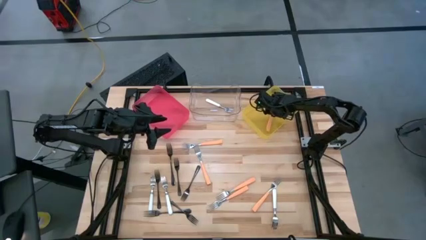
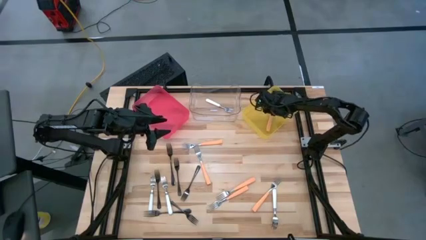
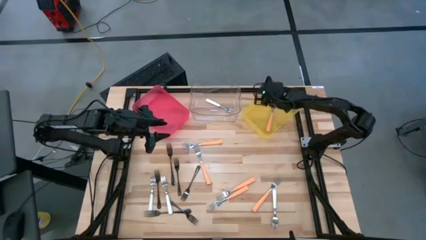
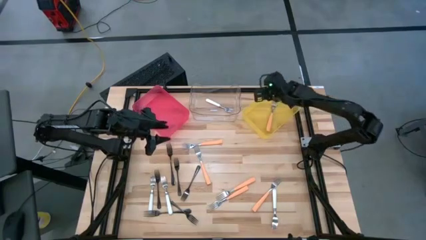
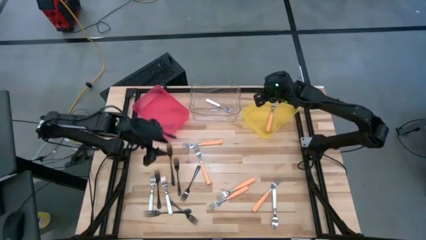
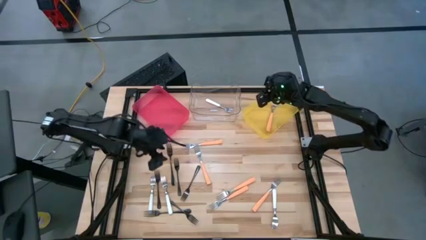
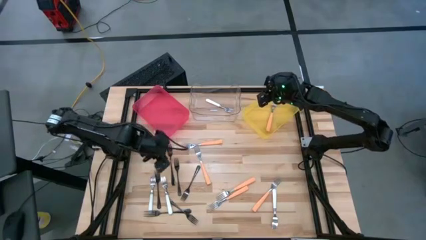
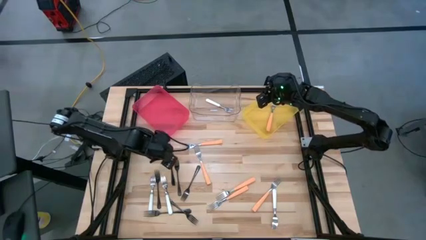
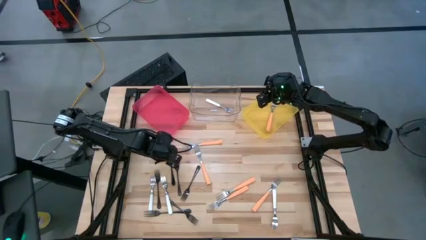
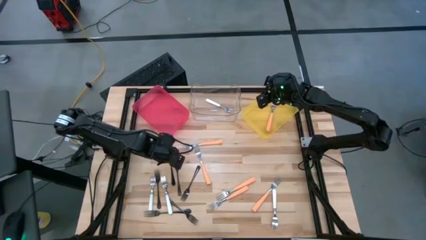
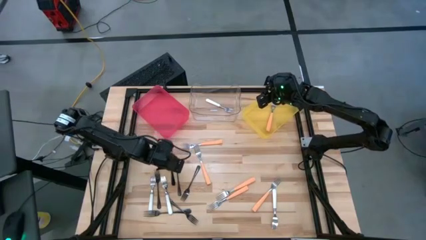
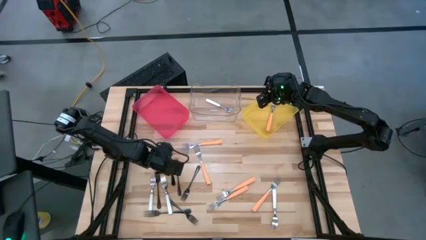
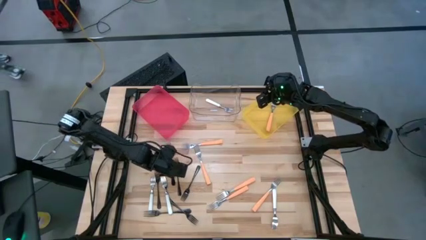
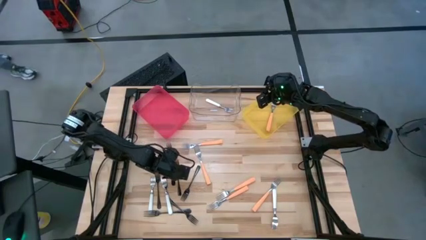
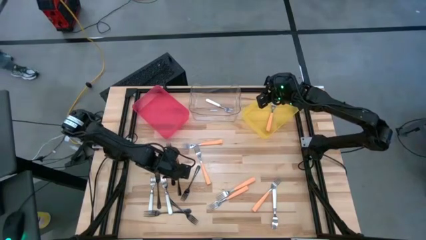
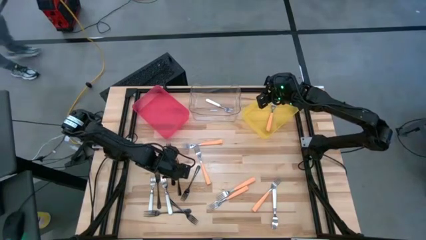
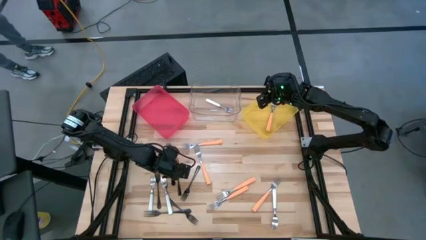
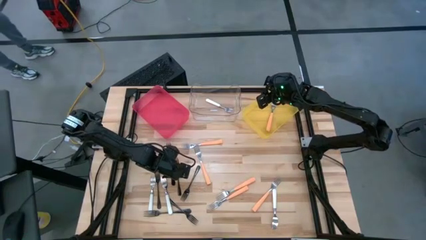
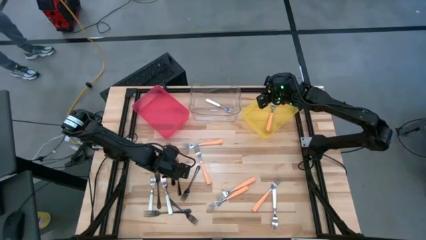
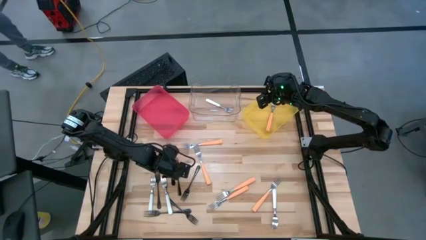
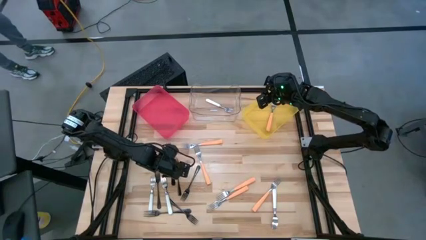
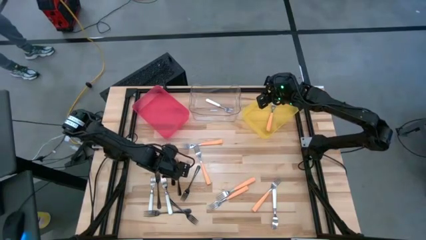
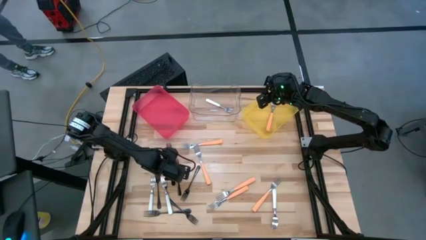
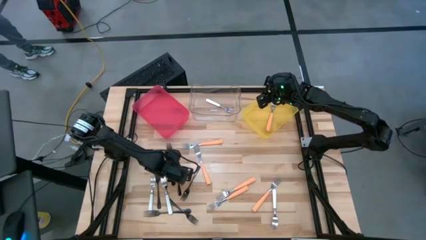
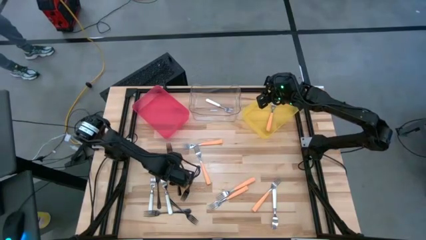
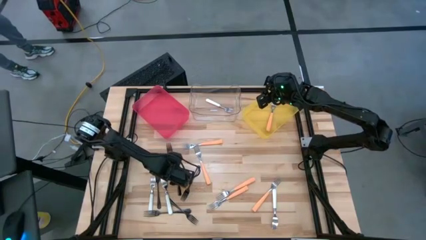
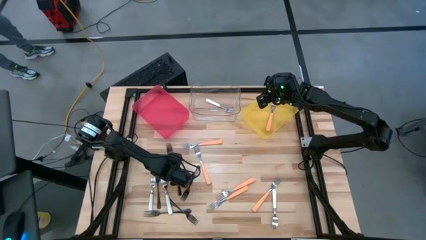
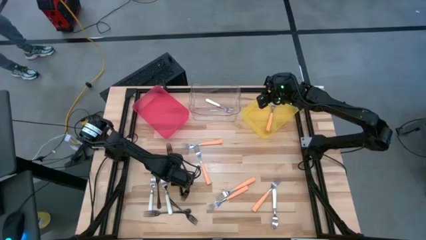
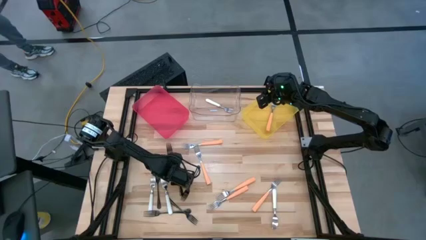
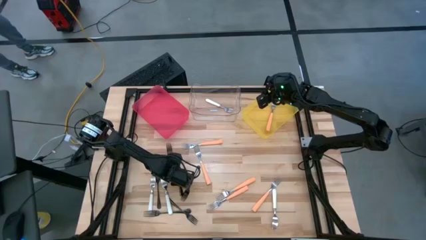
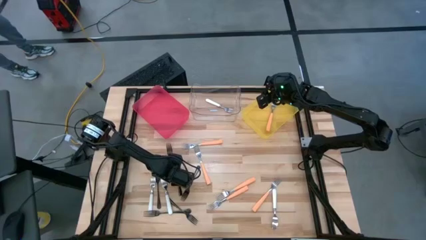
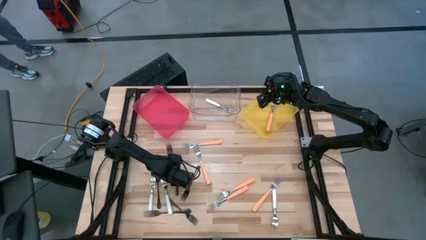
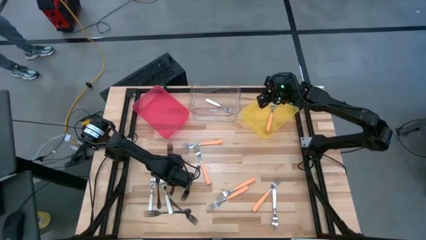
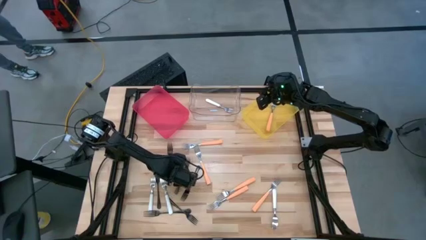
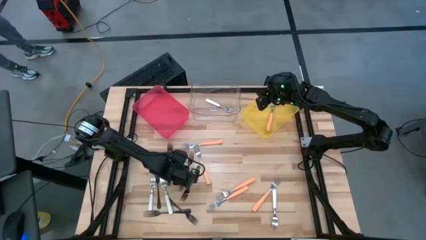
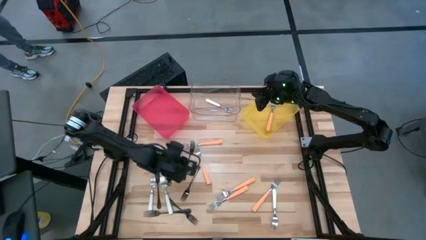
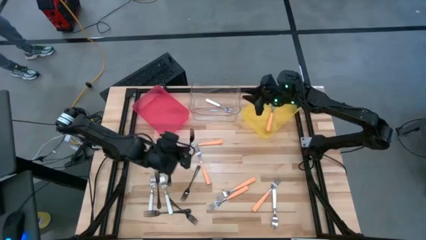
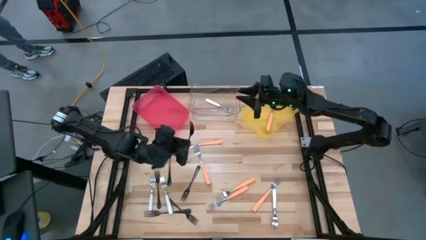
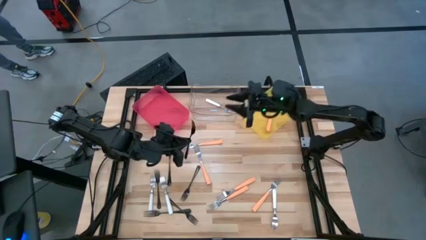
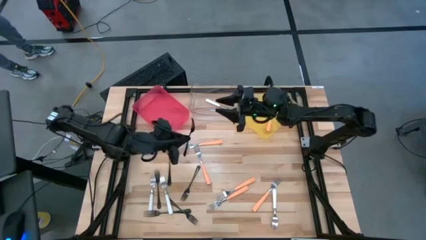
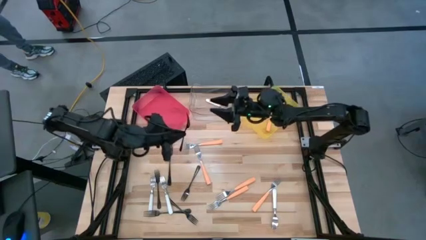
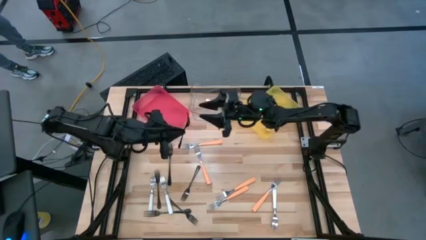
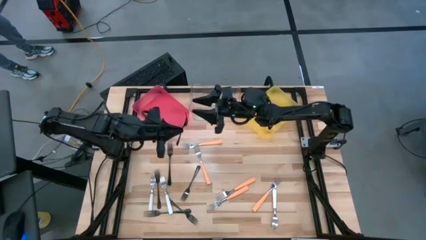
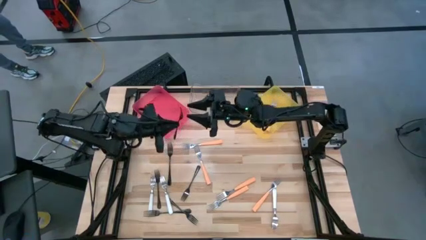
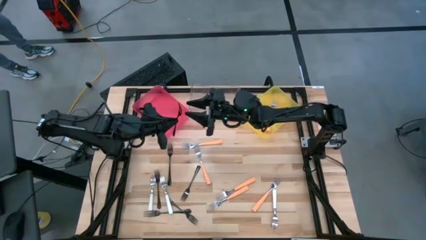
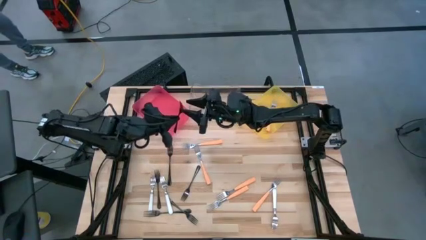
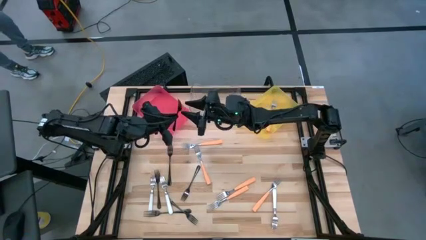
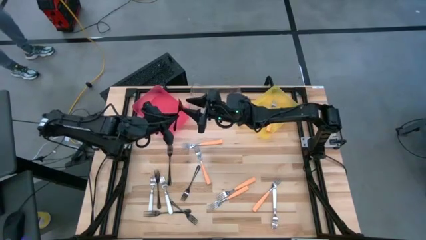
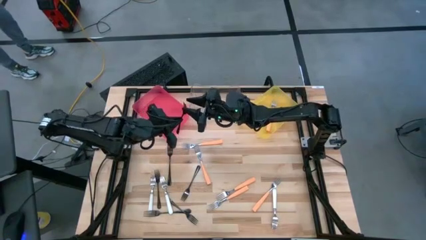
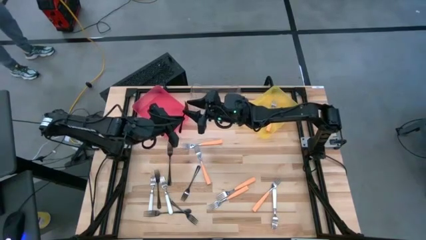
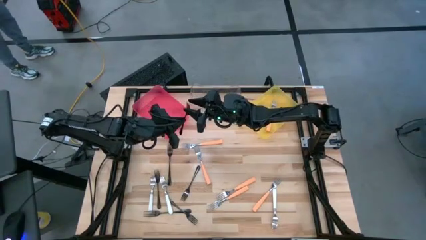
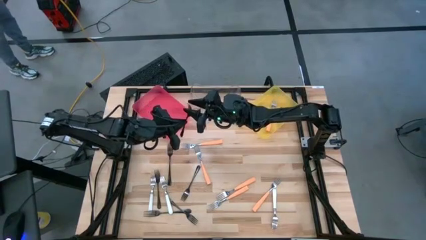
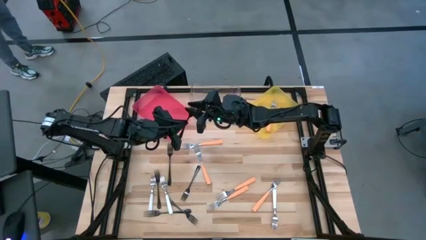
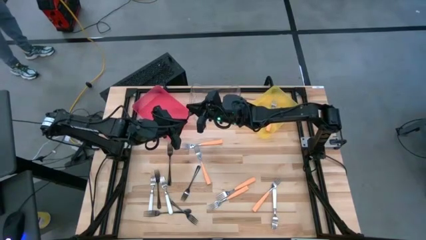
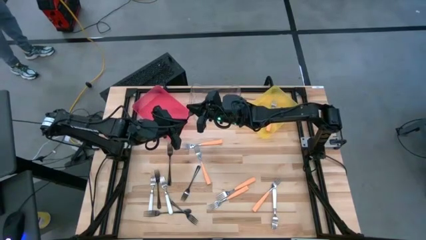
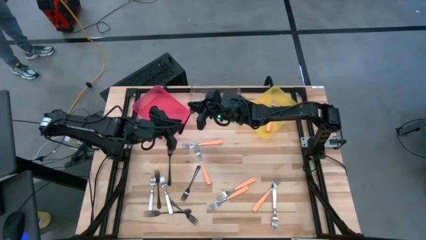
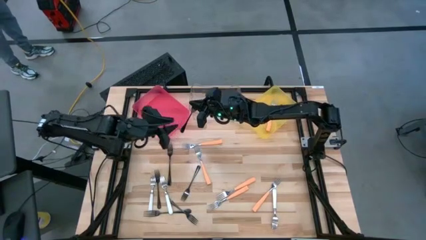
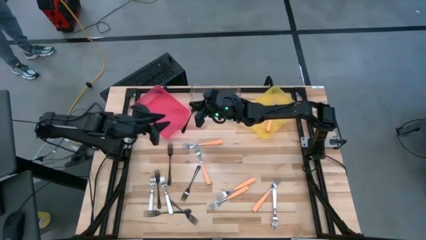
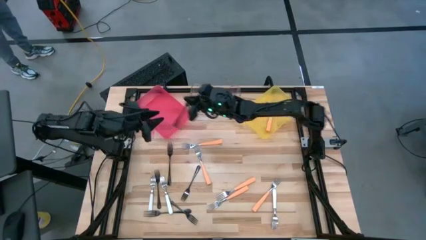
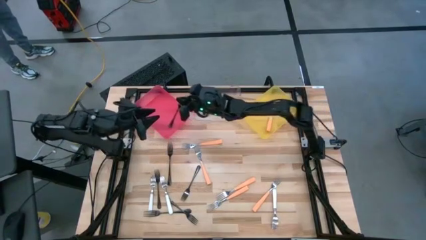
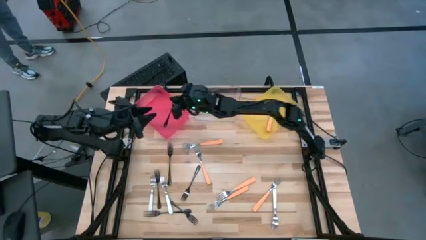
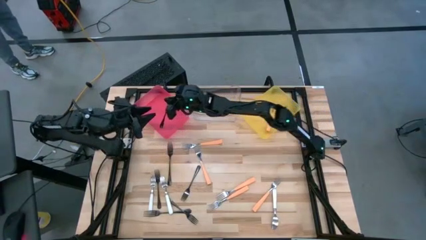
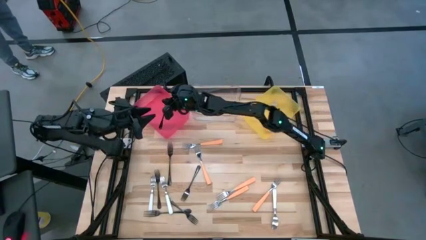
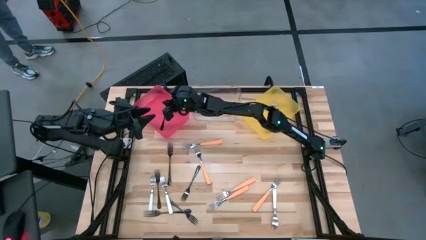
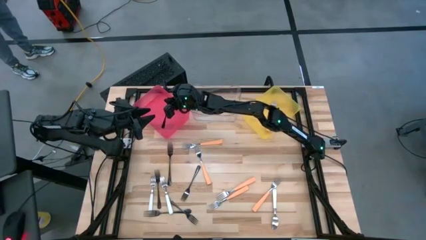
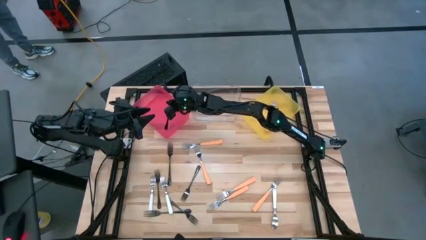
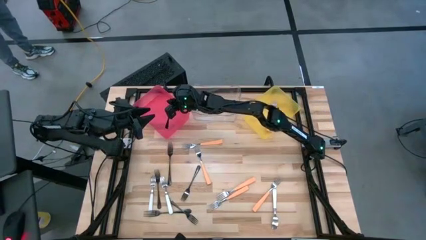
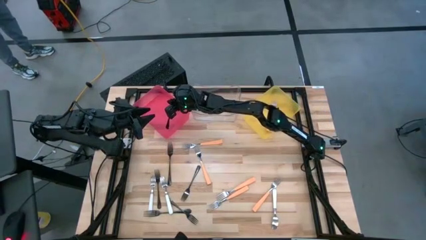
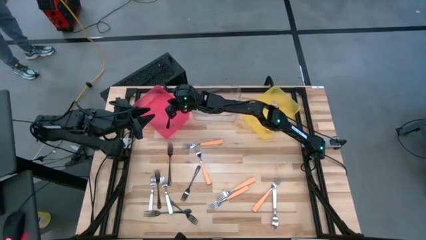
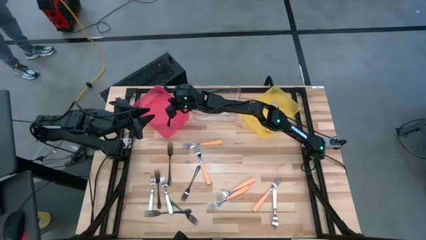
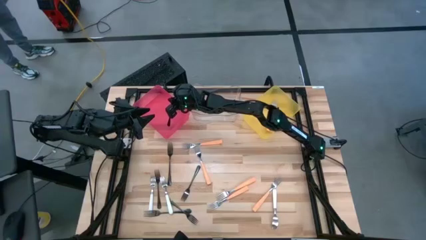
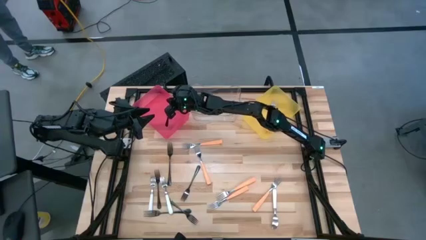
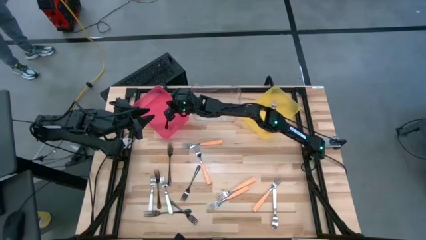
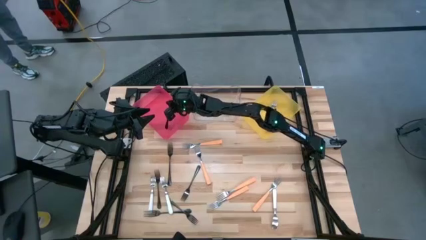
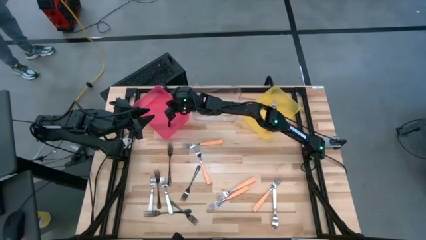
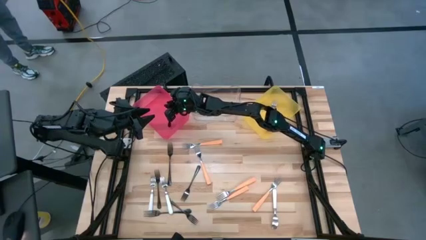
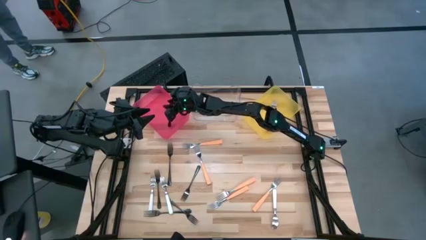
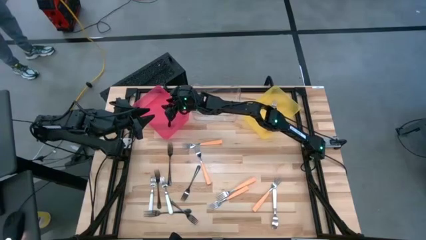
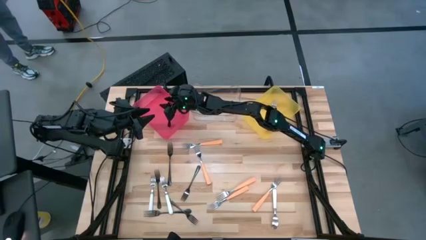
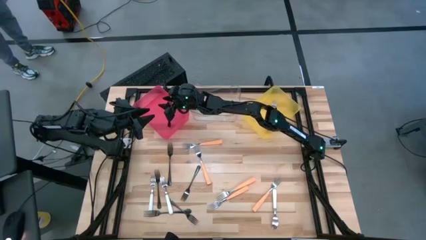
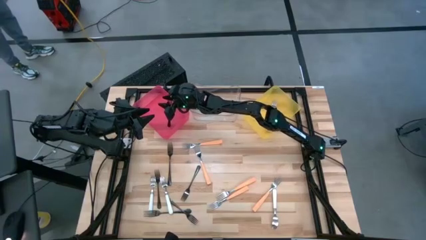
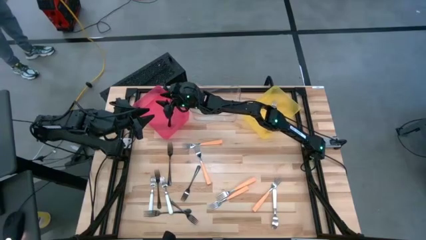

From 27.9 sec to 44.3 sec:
Task: Sort silverware by color (type)
Put the black fork into the pink bin
